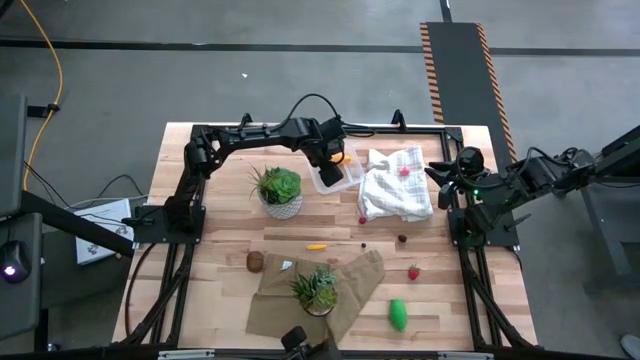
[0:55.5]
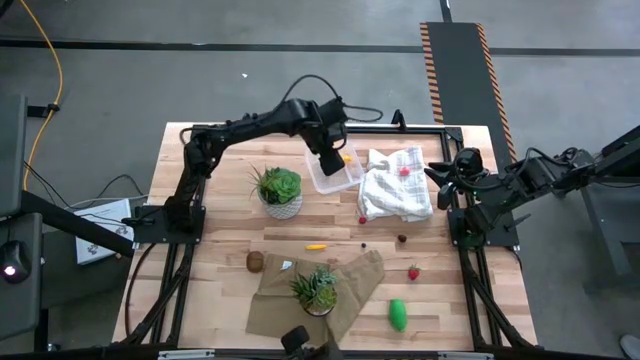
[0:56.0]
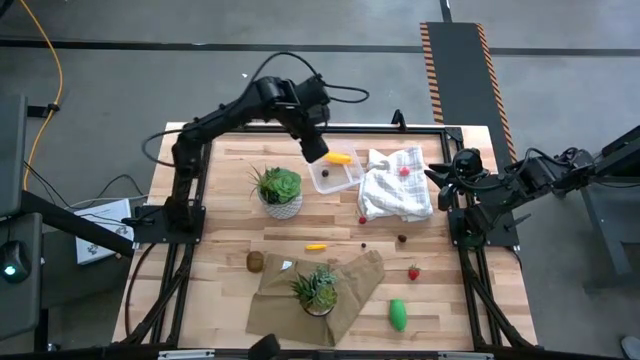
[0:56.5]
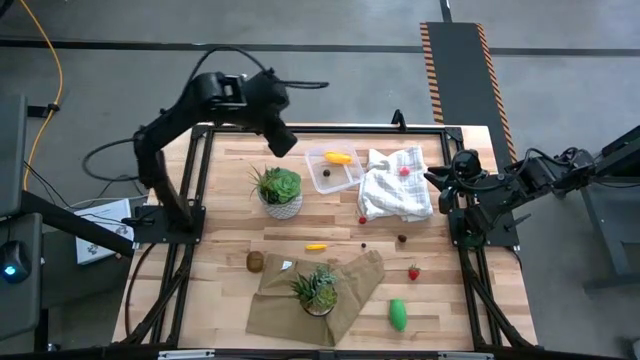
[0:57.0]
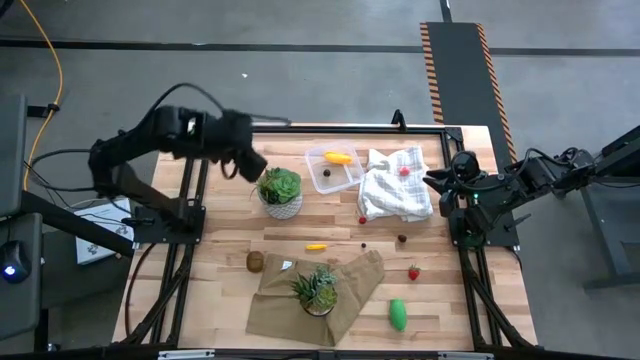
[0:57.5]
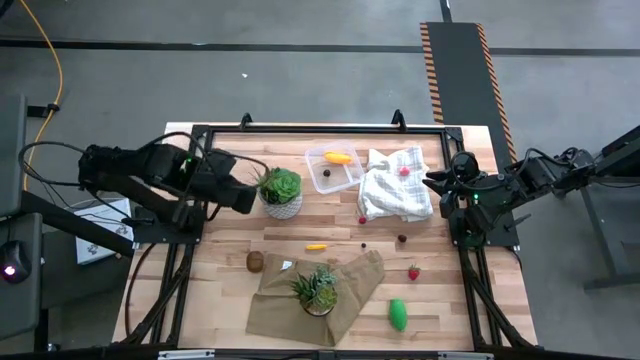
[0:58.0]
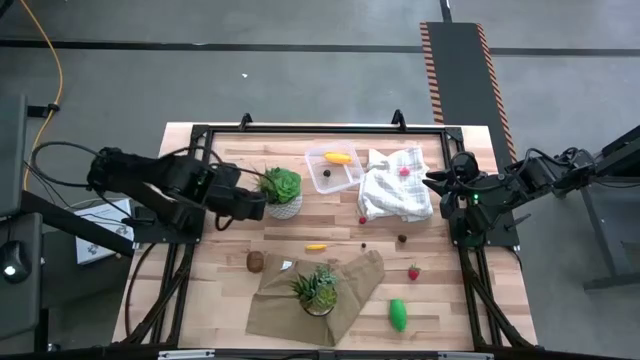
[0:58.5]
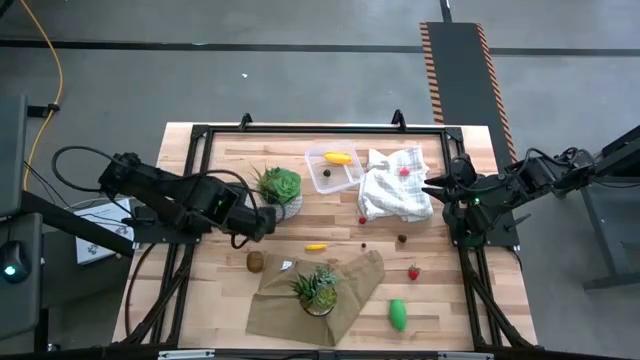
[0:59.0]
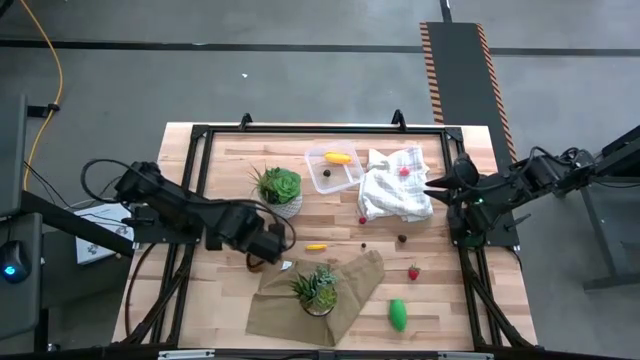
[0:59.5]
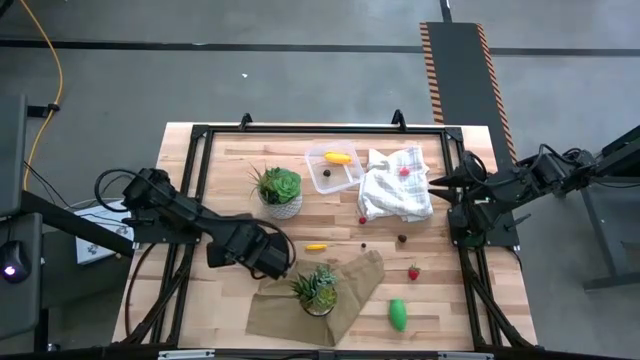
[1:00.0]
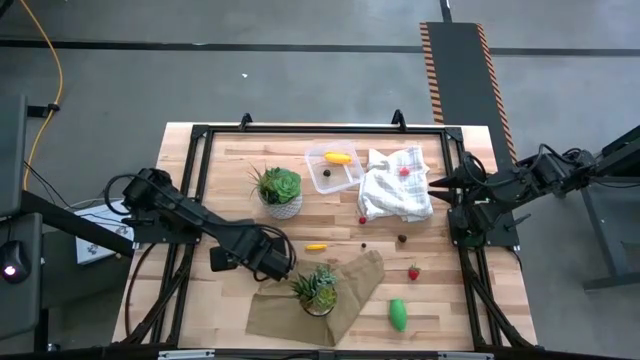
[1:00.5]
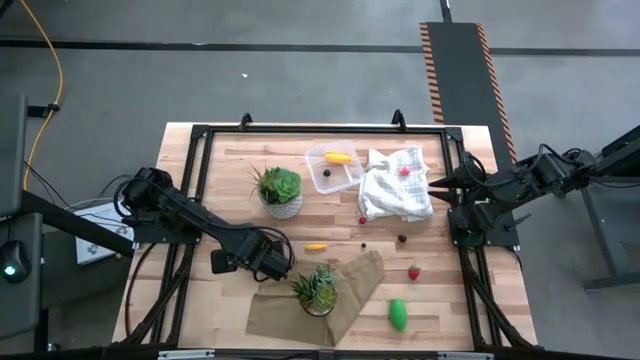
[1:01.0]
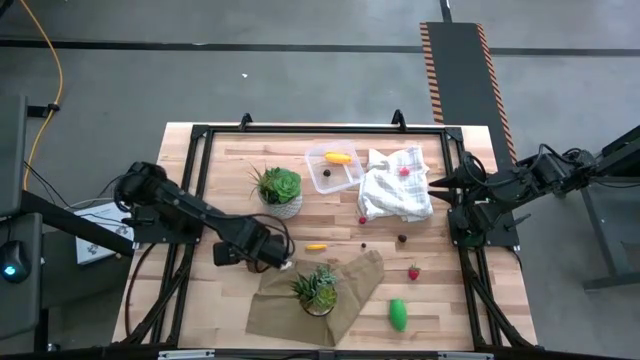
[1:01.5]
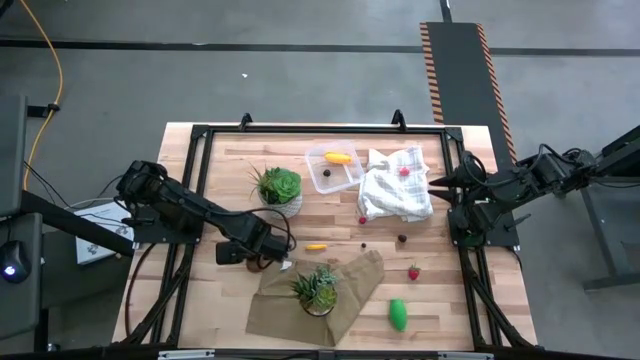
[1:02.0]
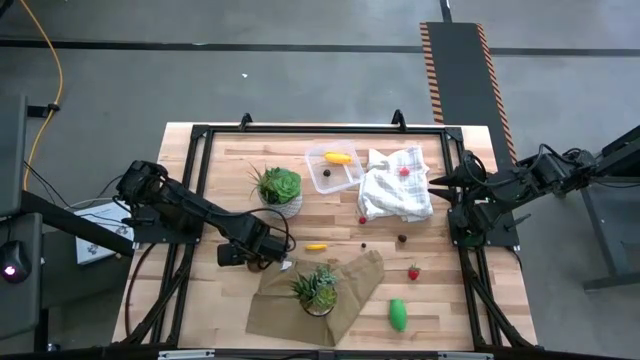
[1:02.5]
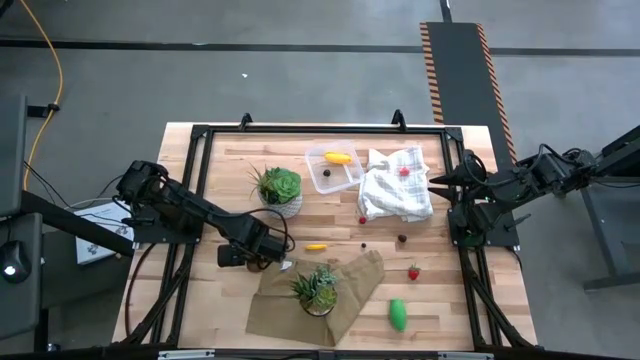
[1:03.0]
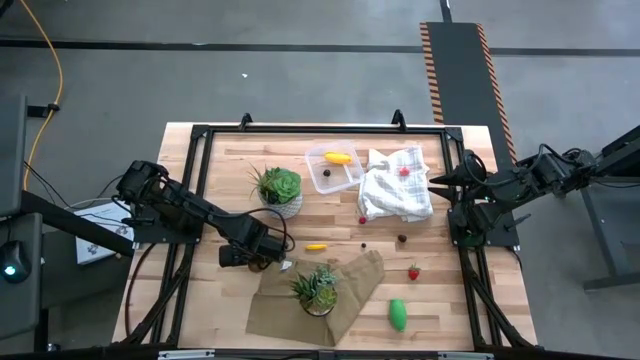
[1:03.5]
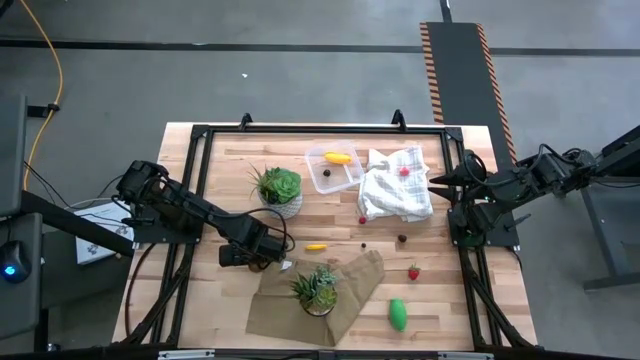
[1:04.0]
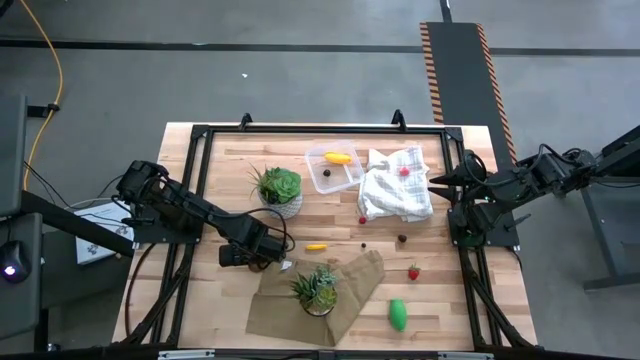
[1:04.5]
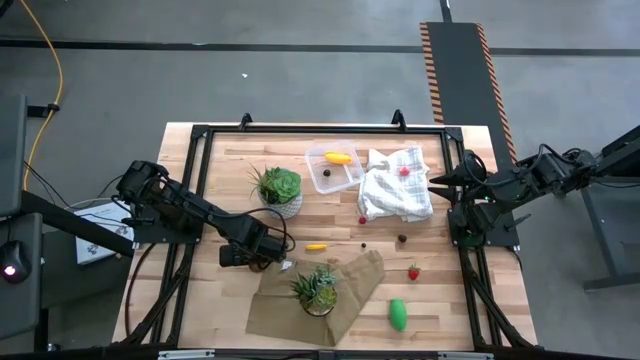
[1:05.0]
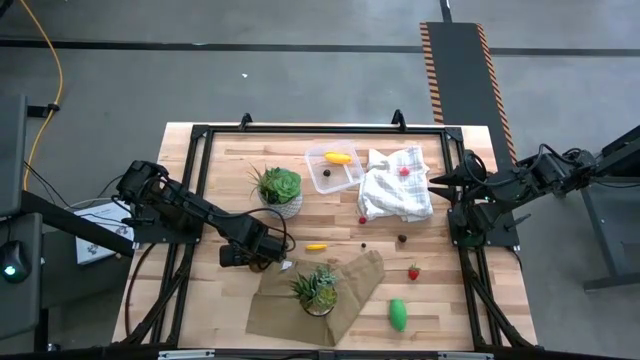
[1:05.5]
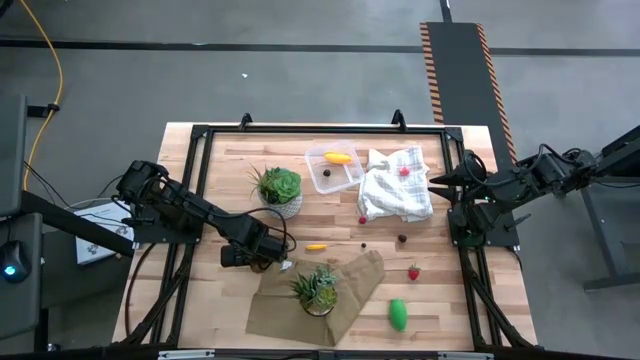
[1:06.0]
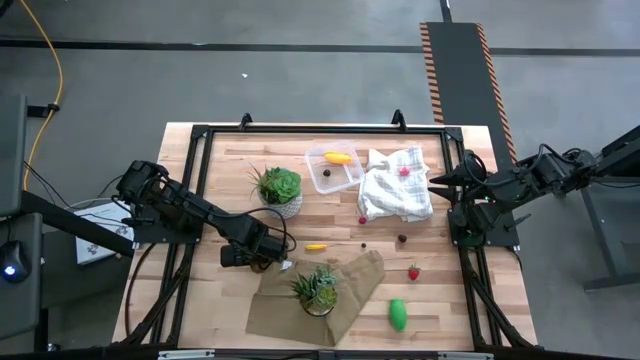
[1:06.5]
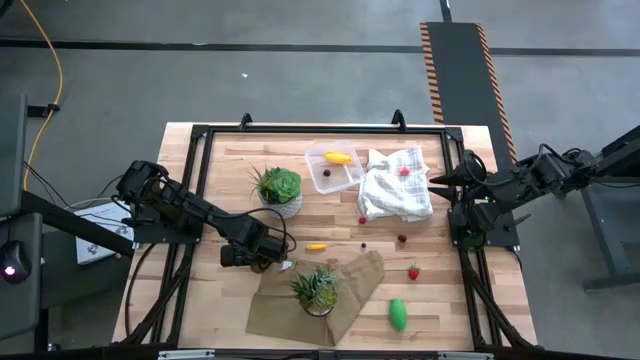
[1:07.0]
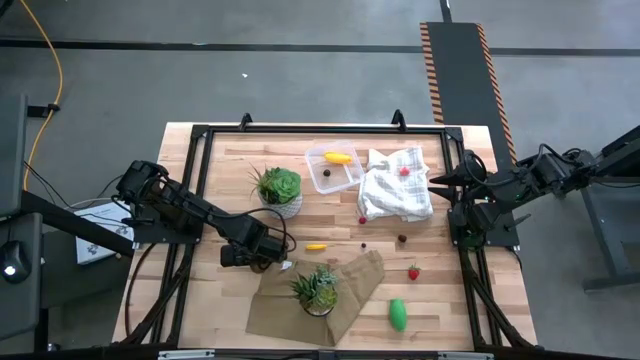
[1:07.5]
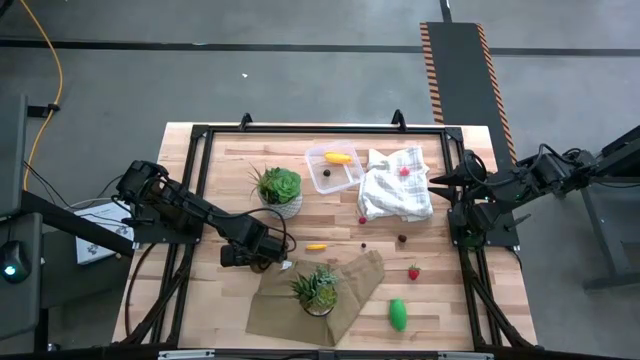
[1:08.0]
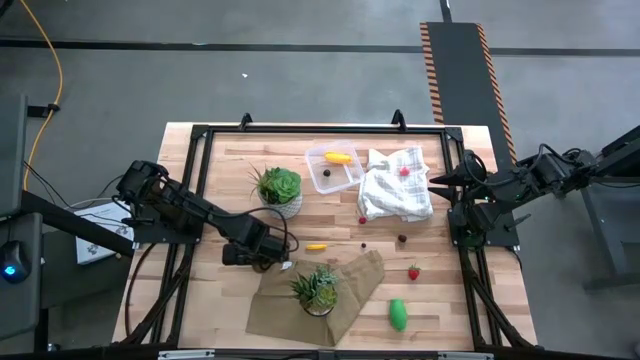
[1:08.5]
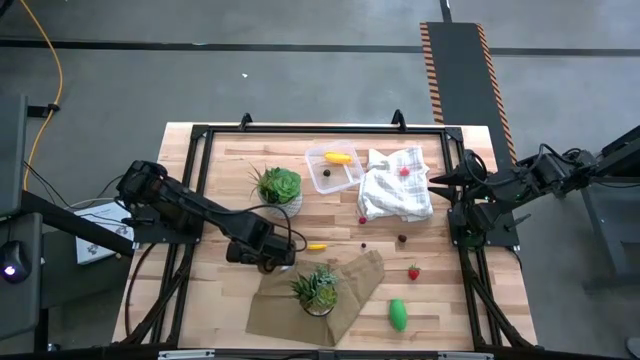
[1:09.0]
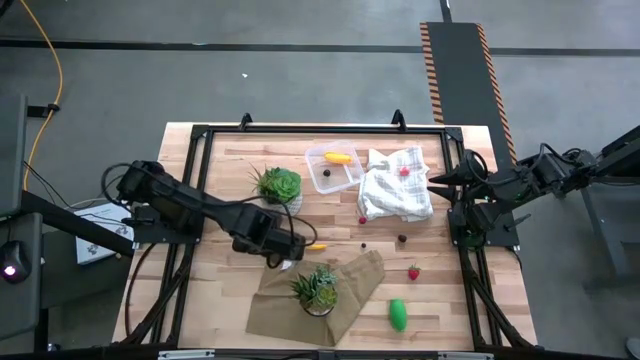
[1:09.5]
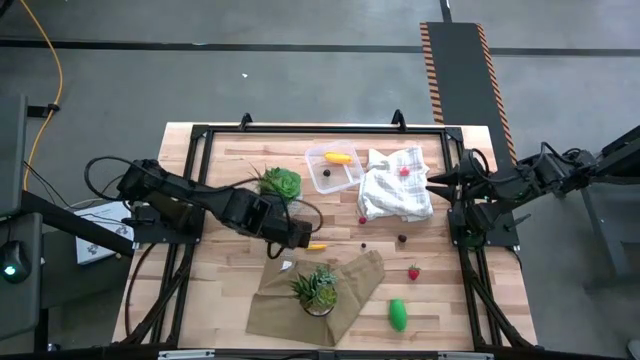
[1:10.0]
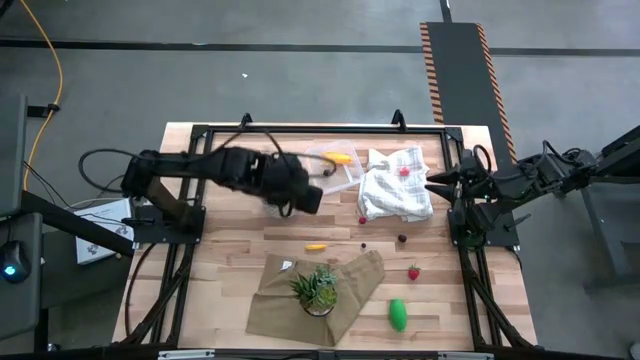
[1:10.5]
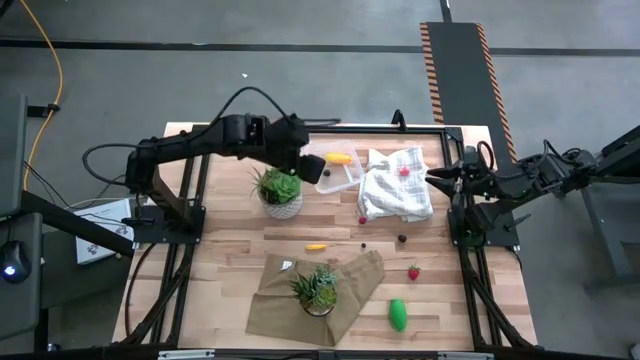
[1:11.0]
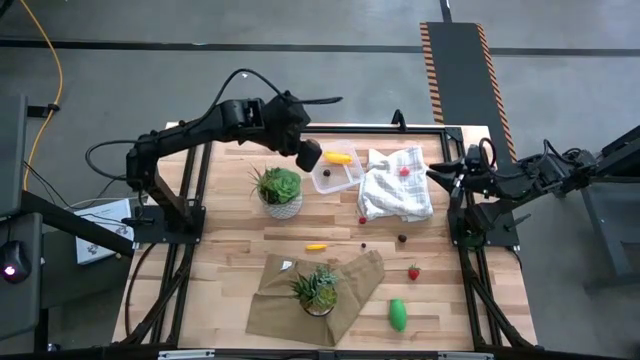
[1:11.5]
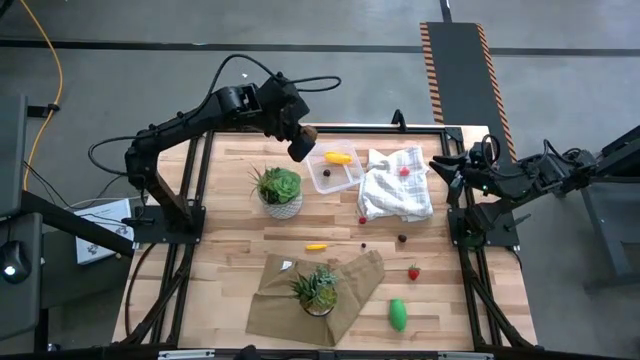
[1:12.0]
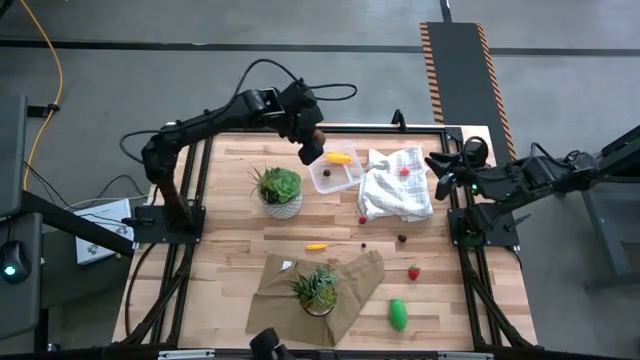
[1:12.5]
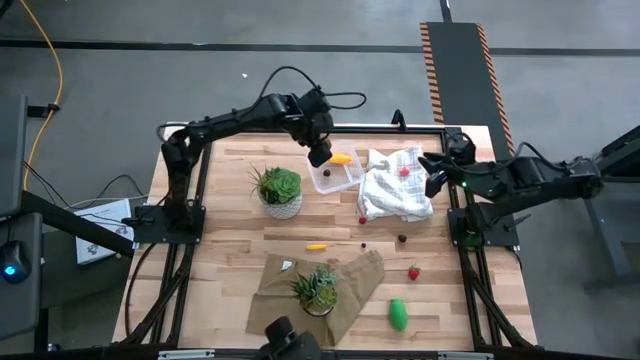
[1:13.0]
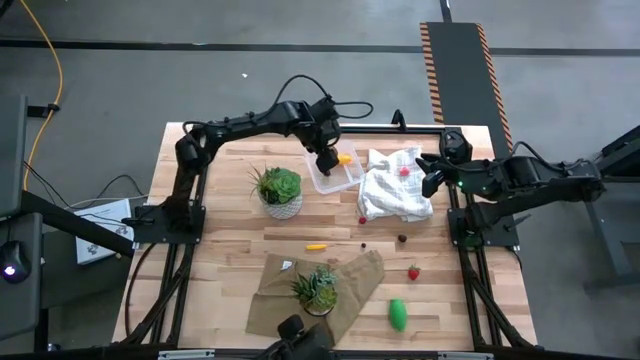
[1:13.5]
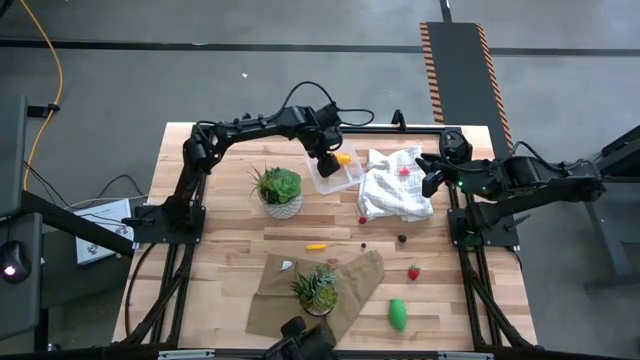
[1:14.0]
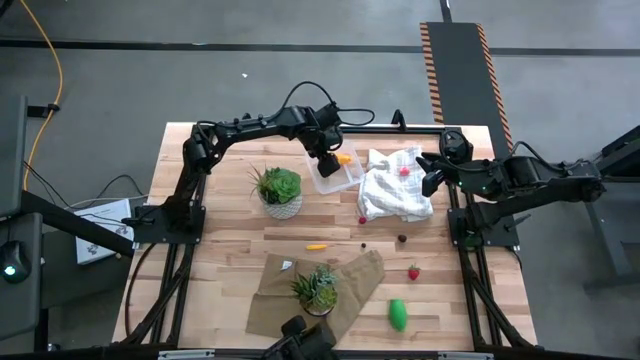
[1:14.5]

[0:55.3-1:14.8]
Task: Pick and placing Produce into tupperware
Put the brown kiwi into the transparent bin
